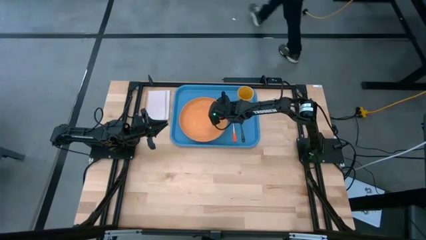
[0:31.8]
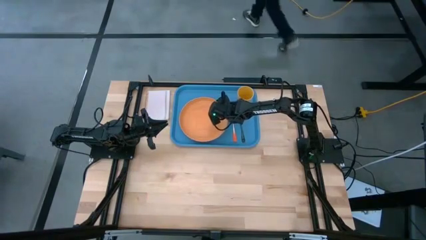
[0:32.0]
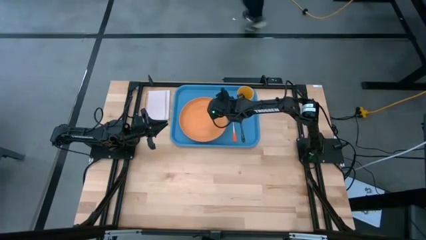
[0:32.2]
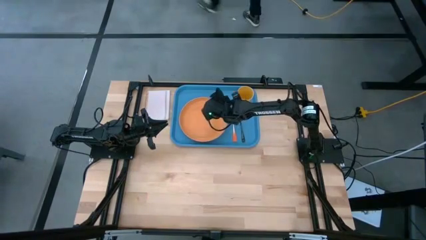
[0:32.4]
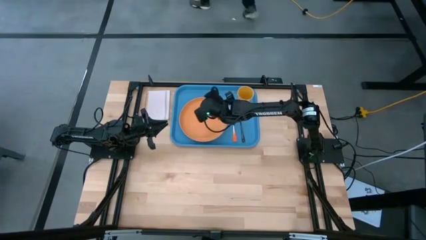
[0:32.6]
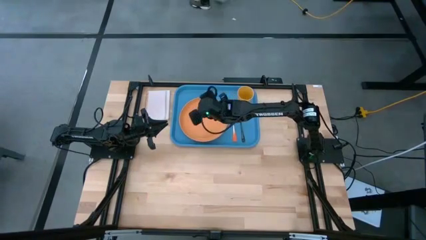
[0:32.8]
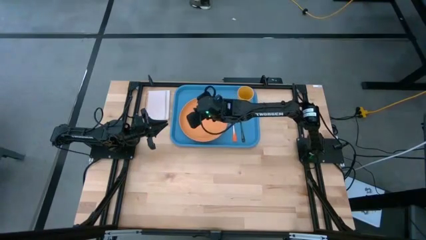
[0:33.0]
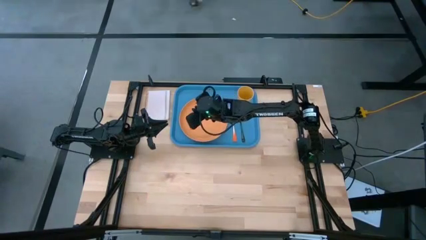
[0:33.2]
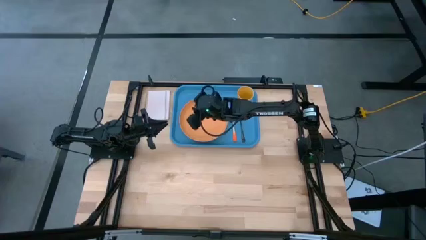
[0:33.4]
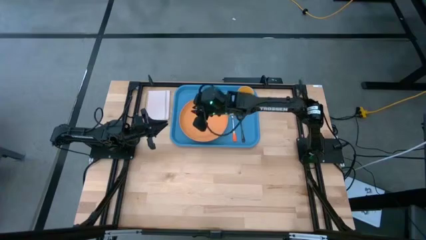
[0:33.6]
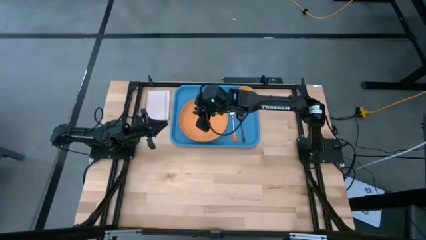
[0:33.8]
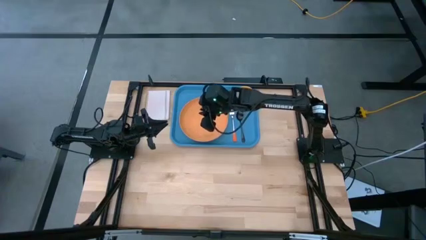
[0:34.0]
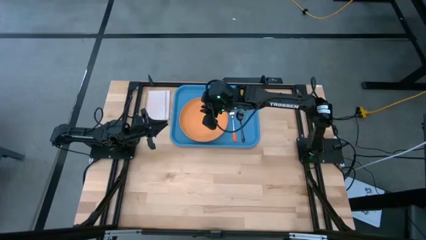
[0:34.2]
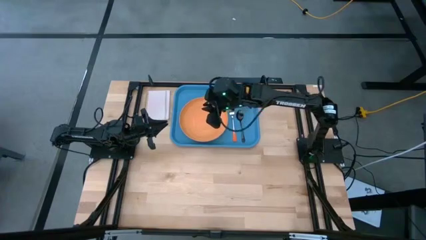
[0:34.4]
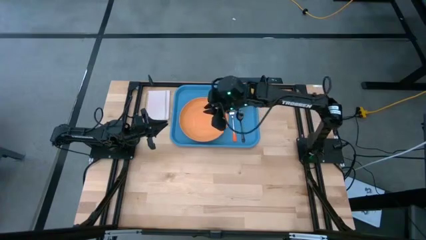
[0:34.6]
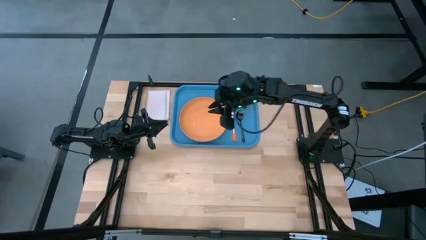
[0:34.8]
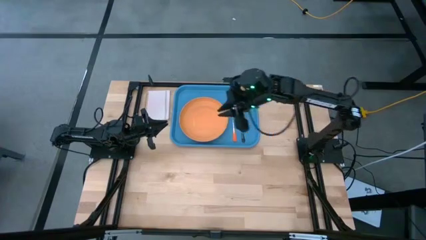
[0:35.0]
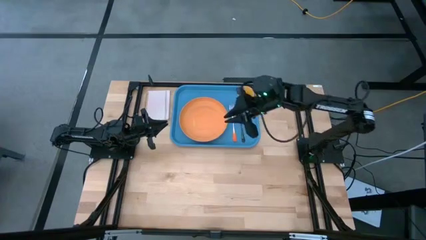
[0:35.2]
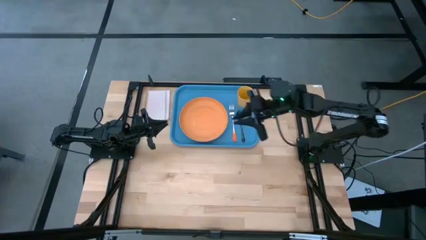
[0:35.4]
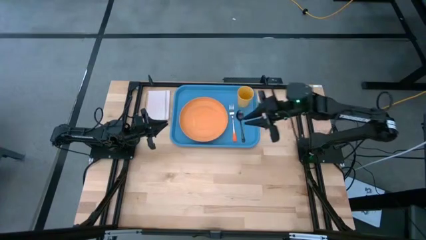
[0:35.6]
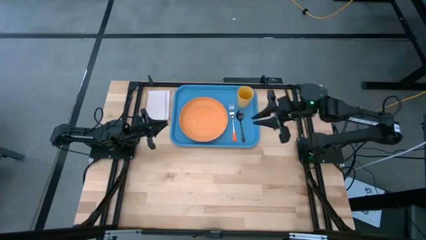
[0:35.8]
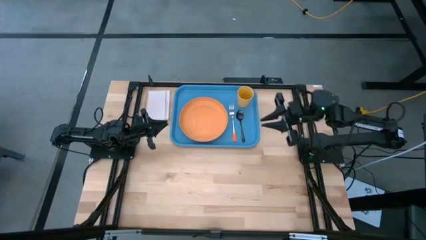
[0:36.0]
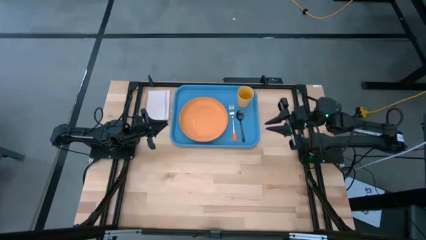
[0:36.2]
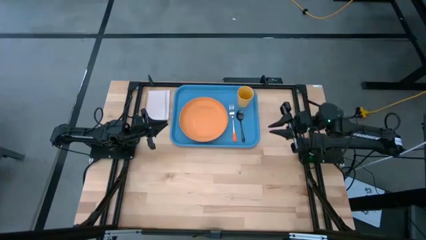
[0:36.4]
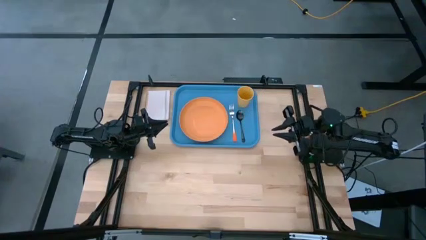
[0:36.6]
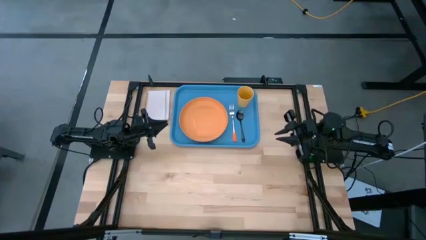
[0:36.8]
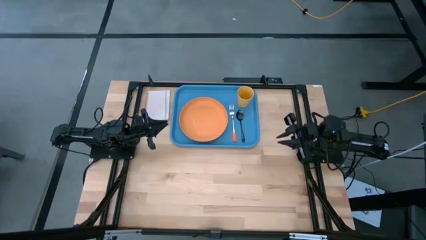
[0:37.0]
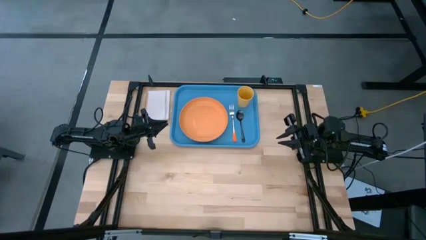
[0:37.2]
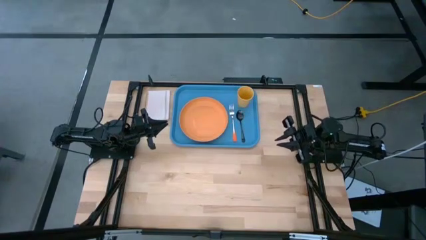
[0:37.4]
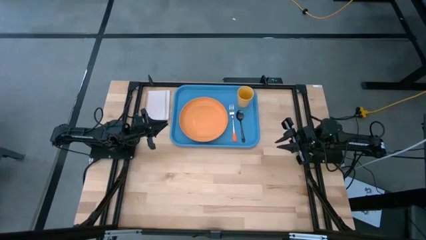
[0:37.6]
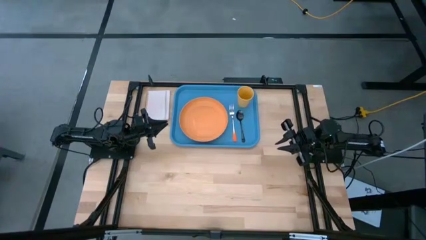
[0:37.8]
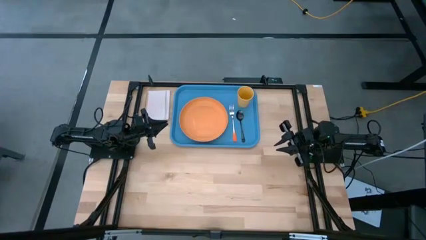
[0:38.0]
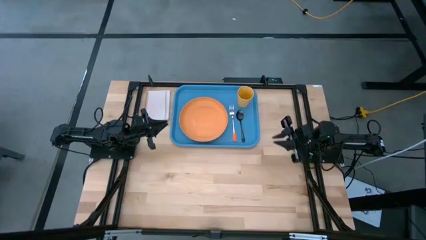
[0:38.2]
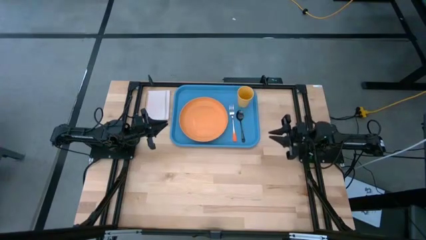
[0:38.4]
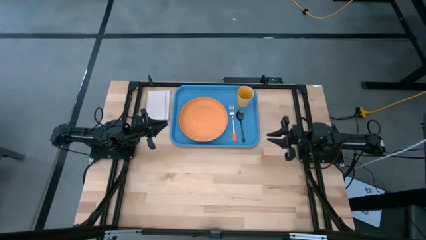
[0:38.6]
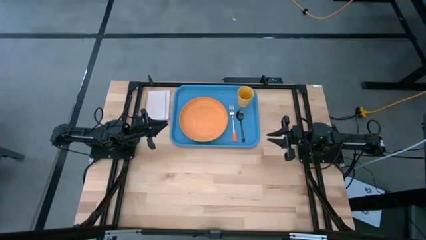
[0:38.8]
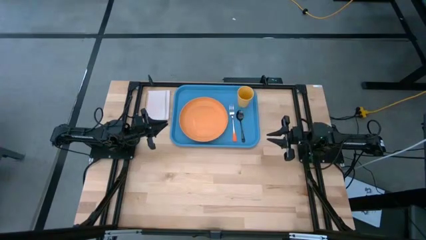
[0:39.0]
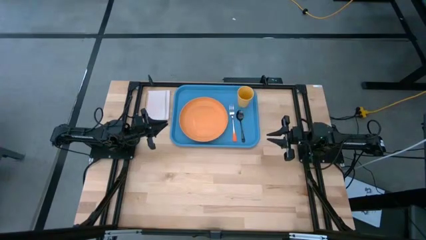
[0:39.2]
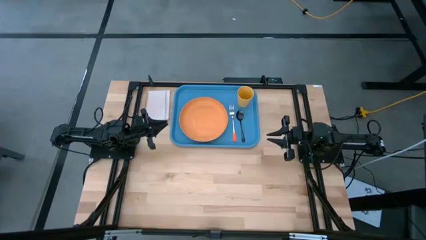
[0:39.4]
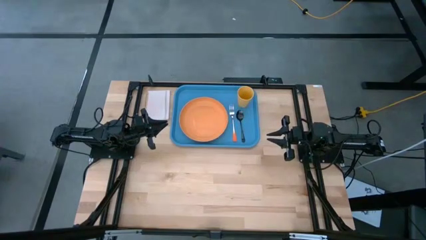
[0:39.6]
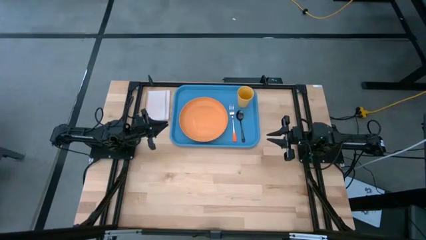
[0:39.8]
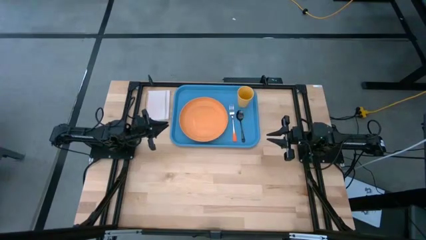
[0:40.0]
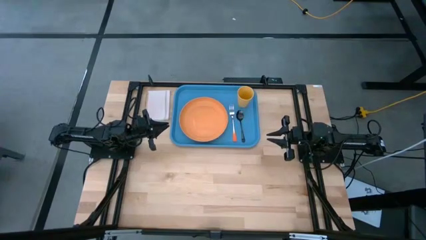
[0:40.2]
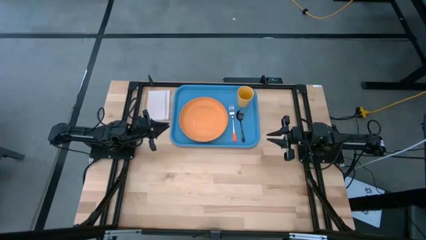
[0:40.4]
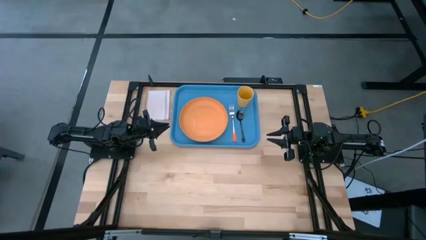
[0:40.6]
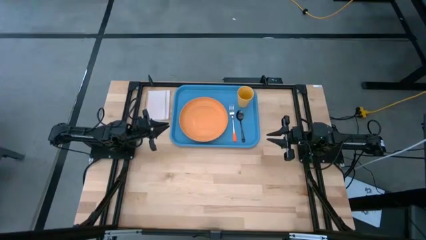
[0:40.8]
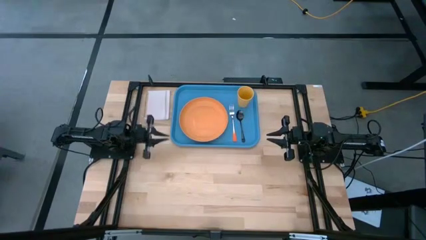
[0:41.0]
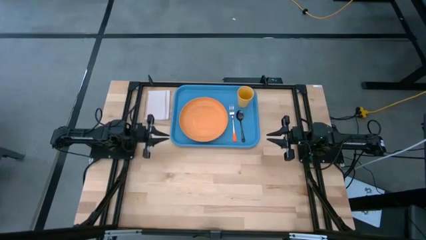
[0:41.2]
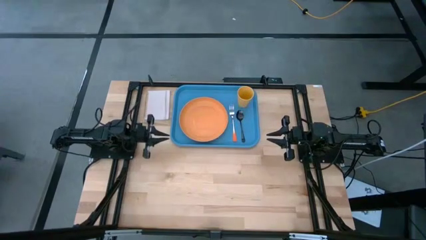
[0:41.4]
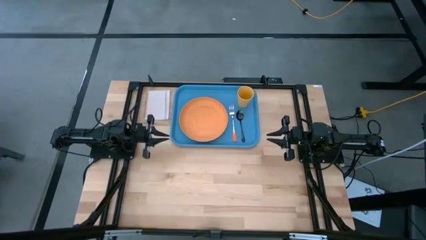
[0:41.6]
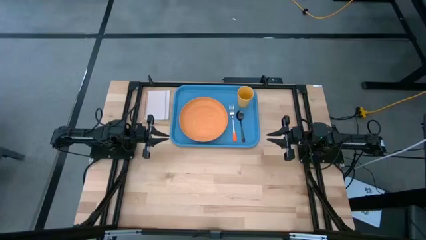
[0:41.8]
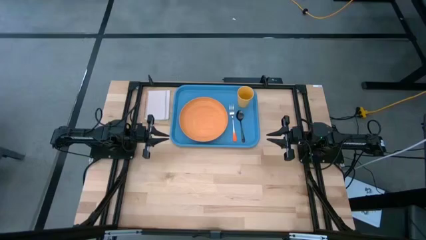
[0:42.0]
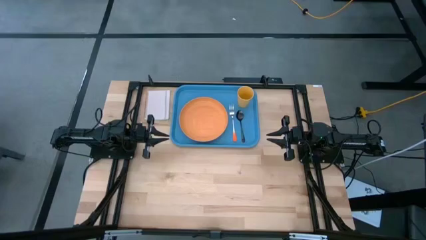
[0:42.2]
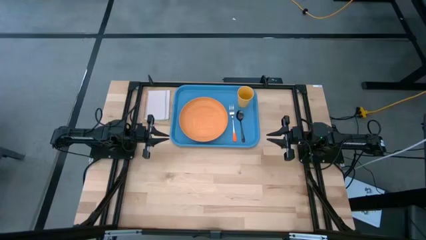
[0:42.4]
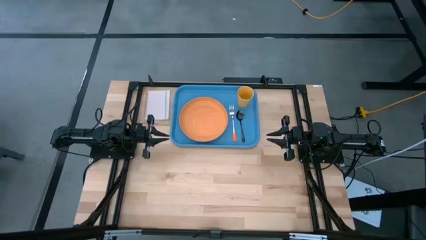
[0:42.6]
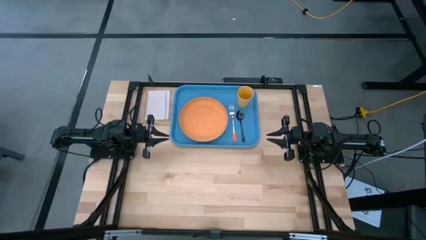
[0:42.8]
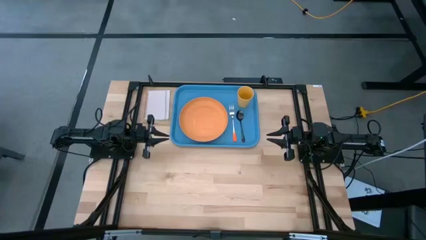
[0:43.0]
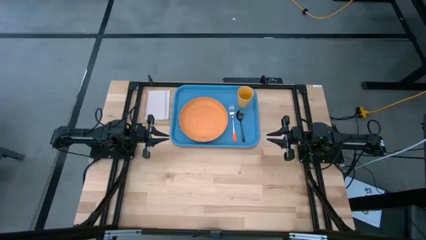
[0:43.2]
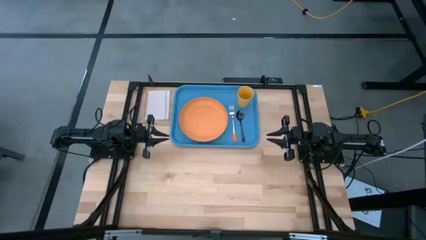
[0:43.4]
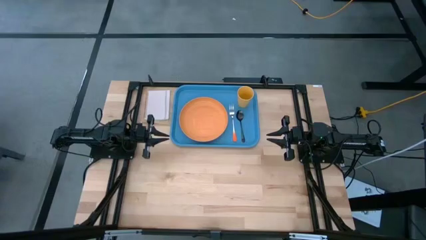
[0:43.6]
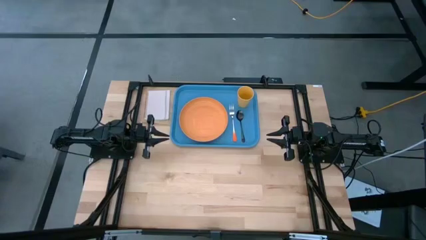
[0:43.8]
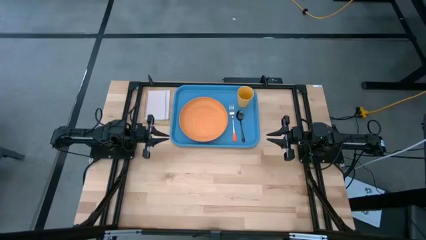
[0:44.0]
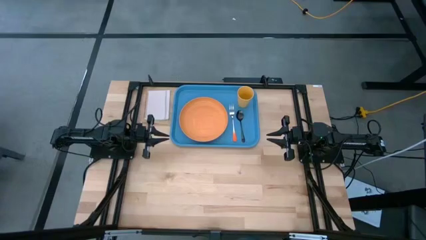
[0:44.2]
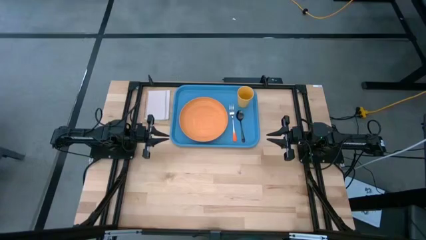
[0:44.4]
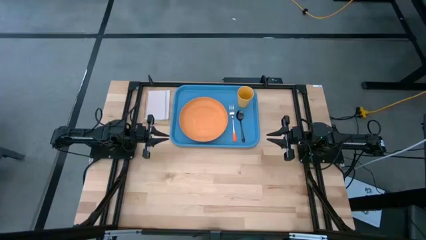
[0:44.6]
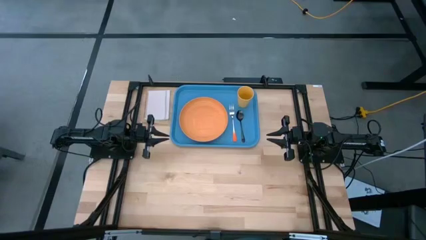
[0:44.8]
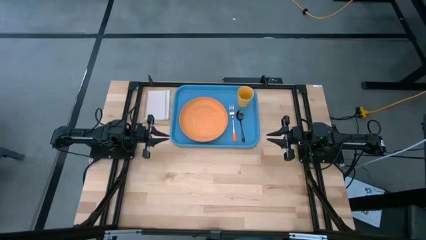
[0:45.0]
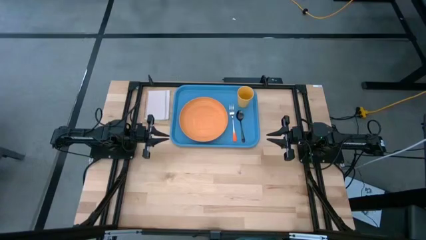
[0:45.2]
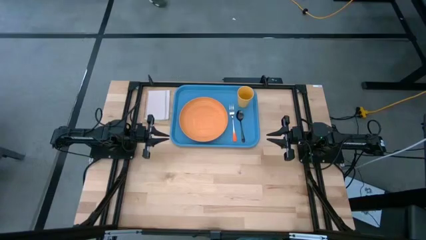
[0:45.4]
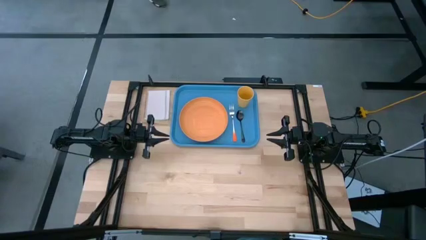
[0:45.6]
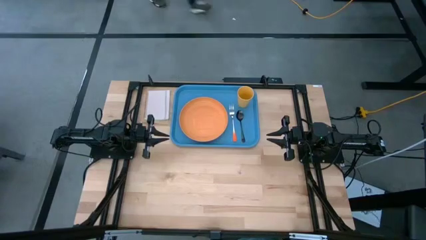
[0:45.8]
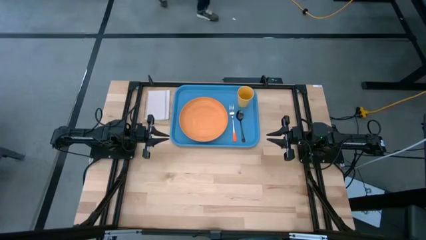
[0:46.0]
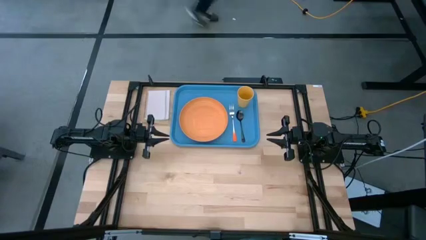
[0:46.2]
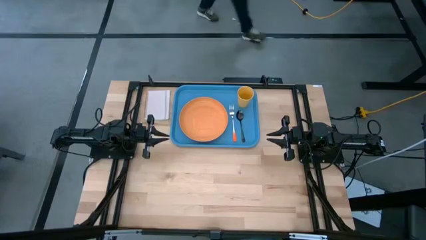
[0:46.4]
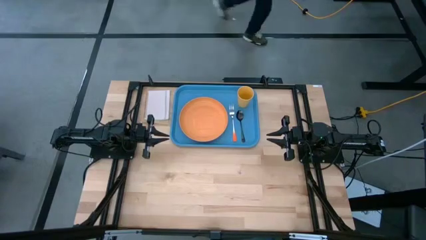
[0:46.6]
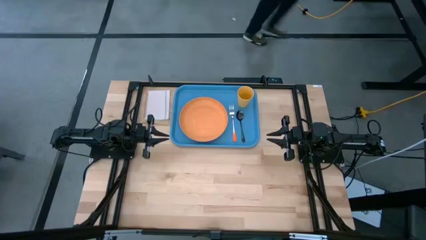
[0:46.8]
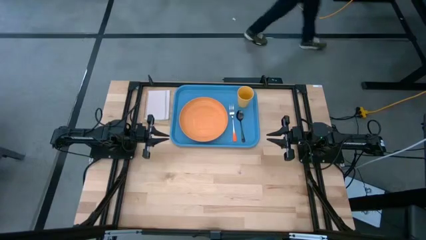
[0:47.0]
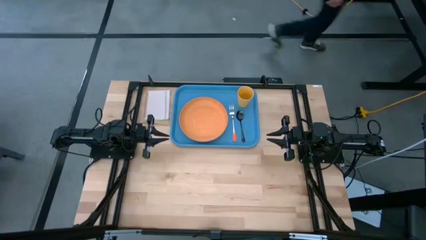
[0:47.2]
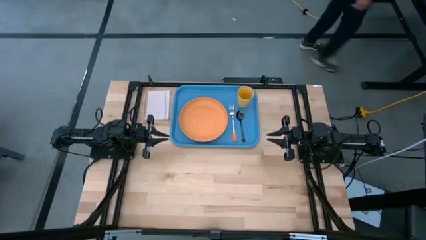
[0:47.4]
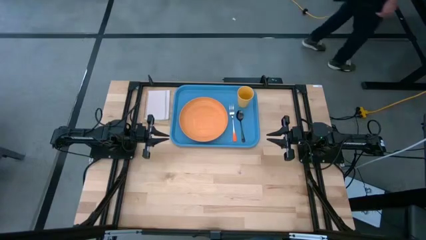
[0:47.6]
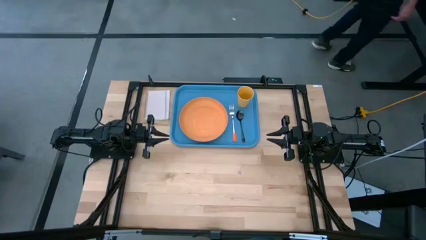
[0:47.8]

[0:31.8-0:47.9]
Task: Pick and place plate/cup/fork/spoon on tray
Return to Home Position
